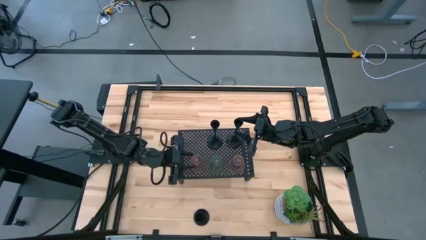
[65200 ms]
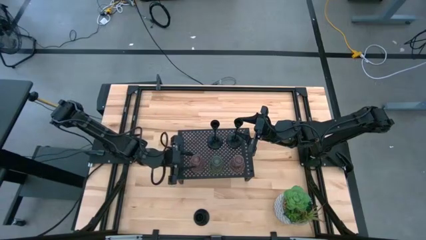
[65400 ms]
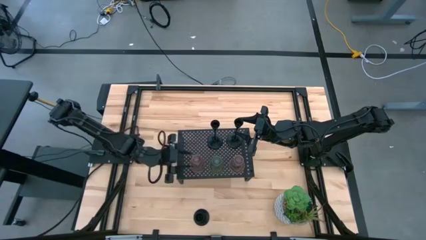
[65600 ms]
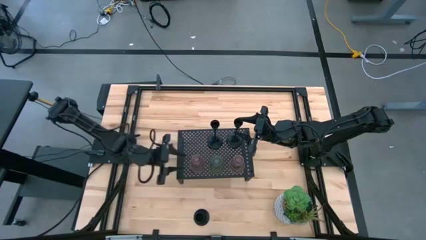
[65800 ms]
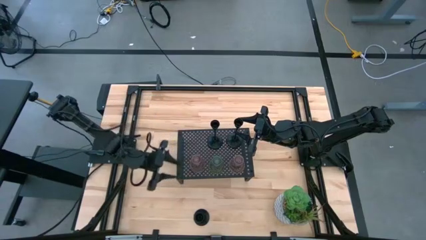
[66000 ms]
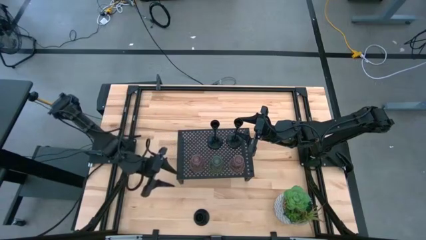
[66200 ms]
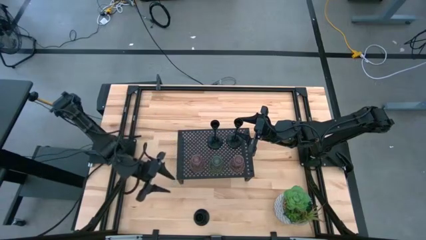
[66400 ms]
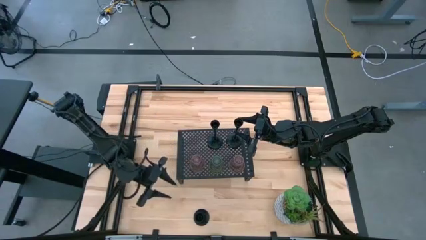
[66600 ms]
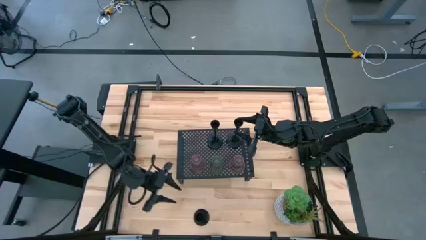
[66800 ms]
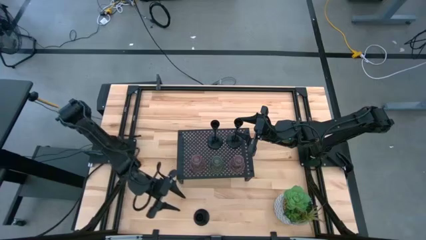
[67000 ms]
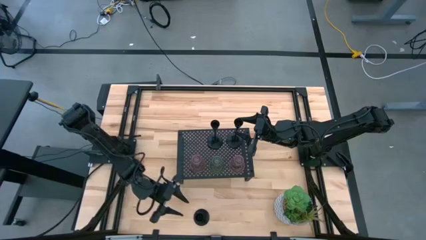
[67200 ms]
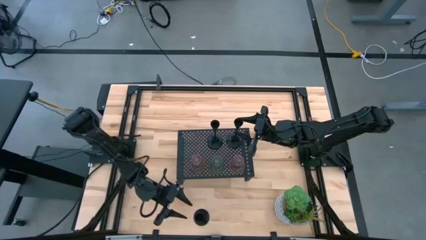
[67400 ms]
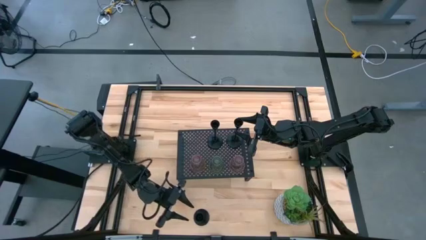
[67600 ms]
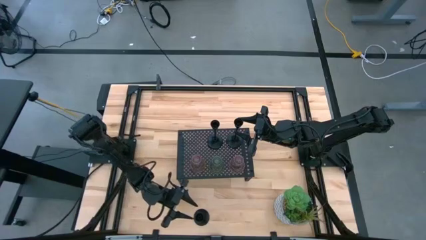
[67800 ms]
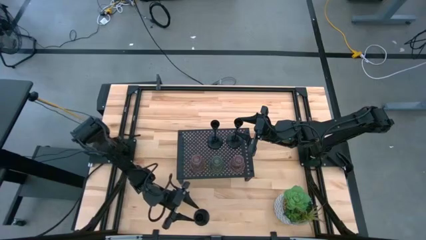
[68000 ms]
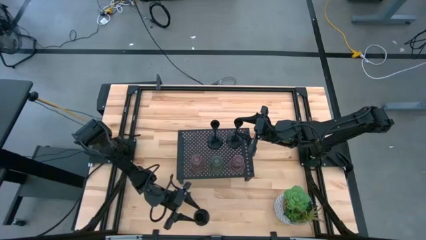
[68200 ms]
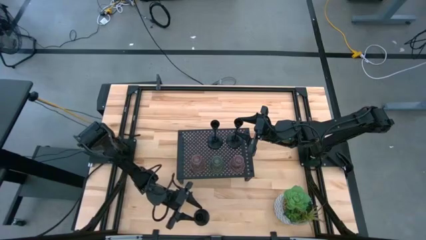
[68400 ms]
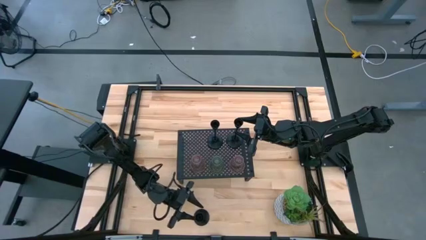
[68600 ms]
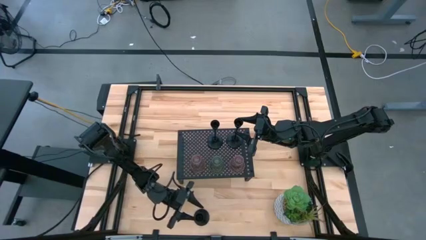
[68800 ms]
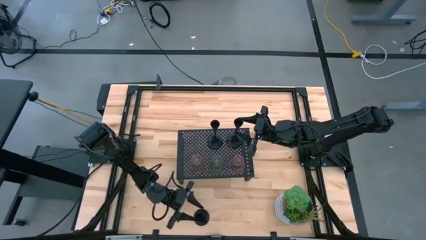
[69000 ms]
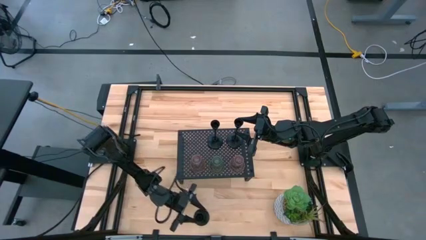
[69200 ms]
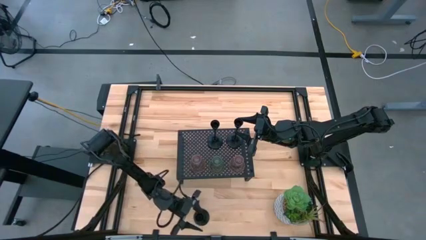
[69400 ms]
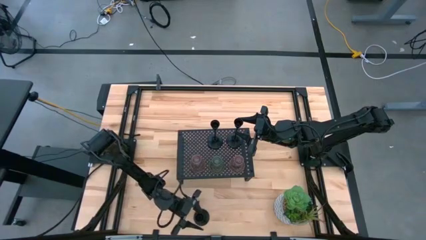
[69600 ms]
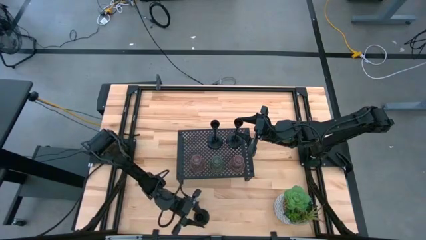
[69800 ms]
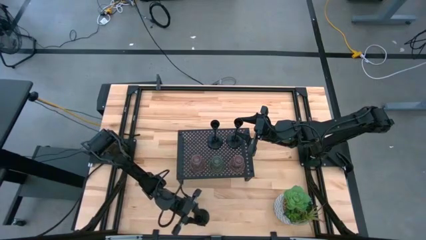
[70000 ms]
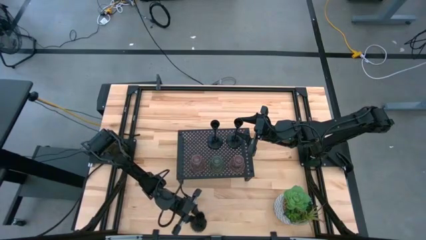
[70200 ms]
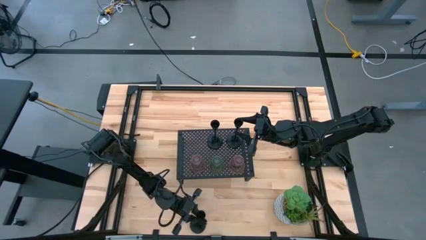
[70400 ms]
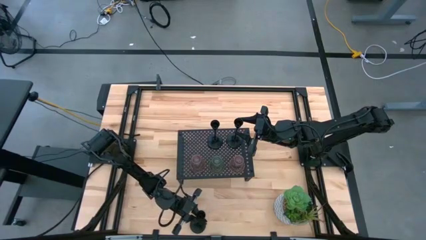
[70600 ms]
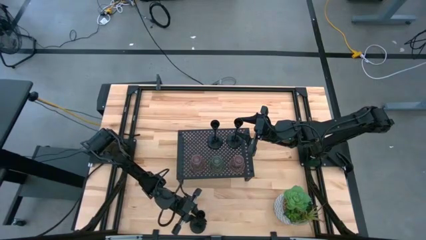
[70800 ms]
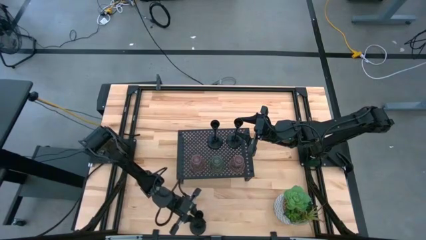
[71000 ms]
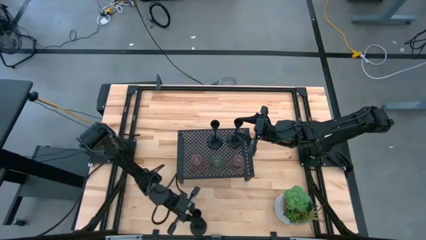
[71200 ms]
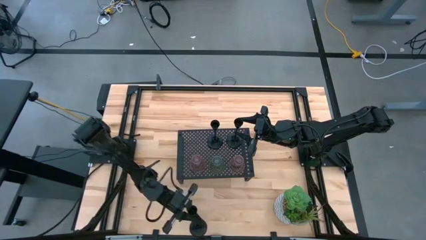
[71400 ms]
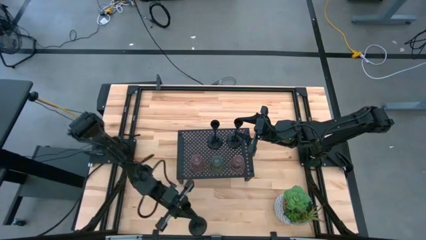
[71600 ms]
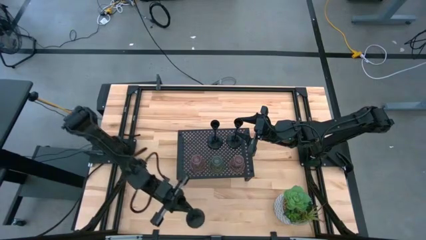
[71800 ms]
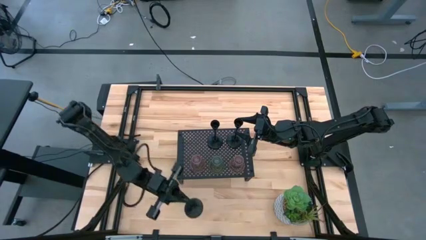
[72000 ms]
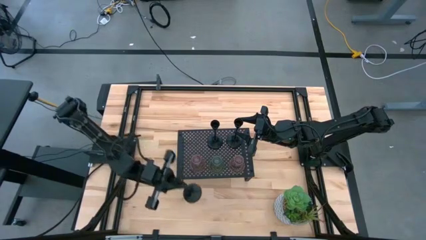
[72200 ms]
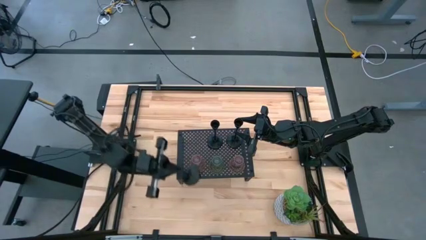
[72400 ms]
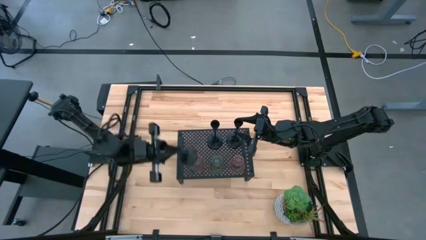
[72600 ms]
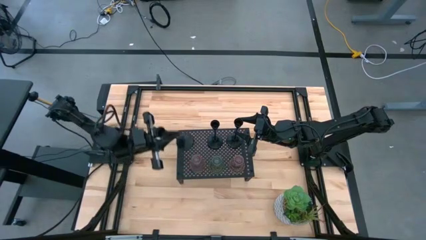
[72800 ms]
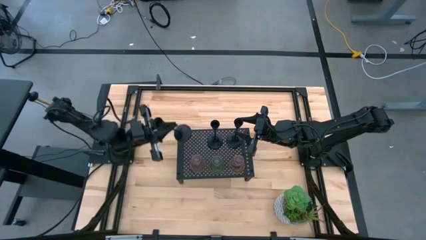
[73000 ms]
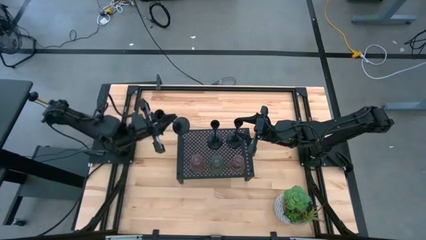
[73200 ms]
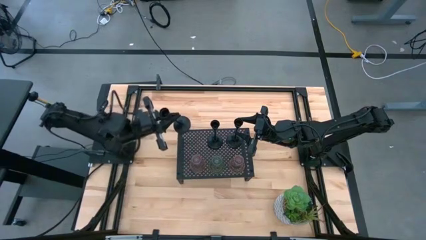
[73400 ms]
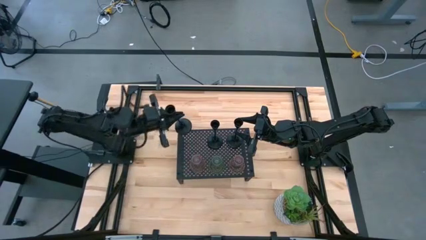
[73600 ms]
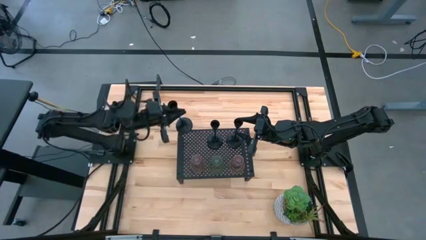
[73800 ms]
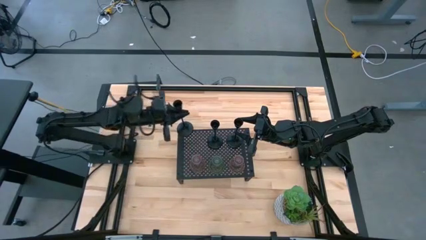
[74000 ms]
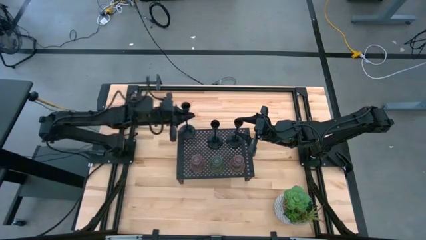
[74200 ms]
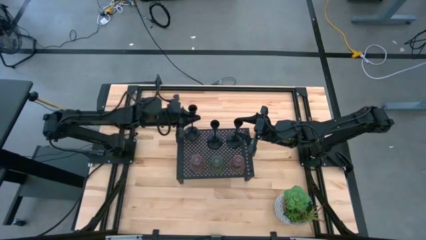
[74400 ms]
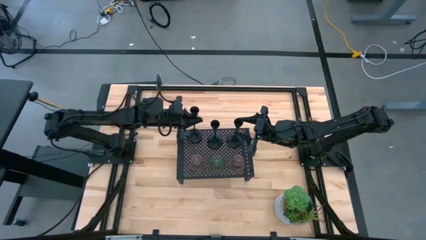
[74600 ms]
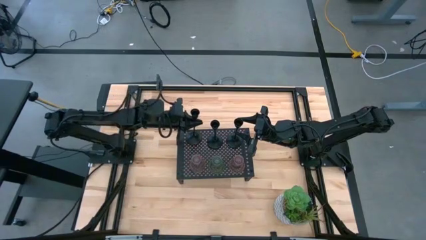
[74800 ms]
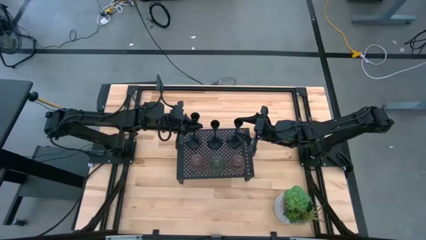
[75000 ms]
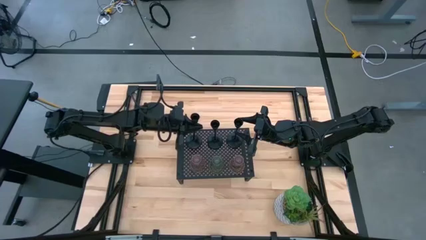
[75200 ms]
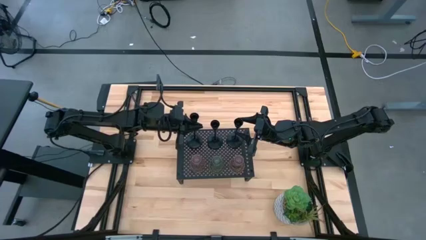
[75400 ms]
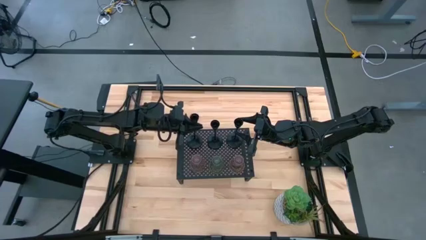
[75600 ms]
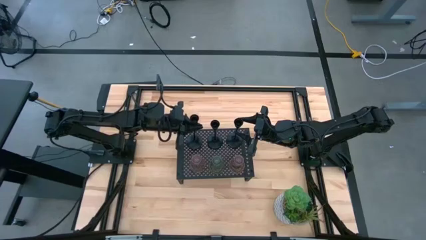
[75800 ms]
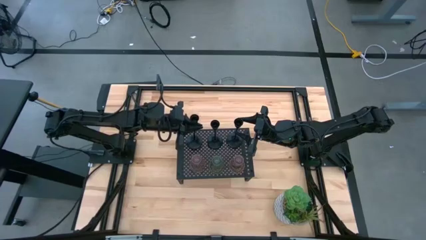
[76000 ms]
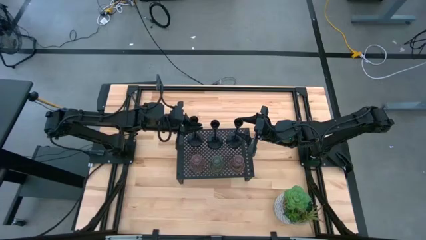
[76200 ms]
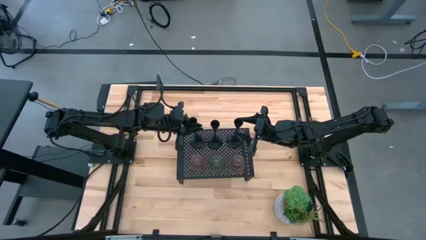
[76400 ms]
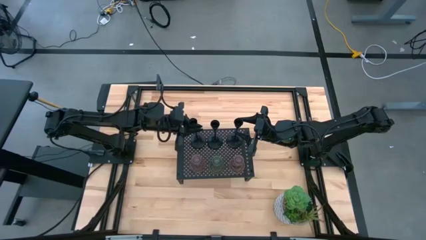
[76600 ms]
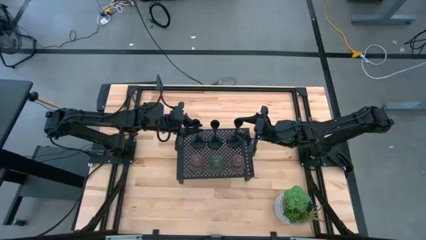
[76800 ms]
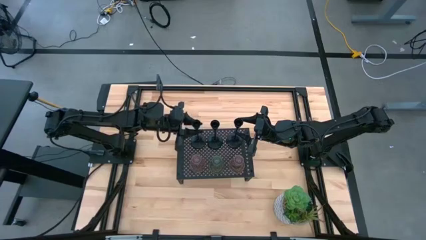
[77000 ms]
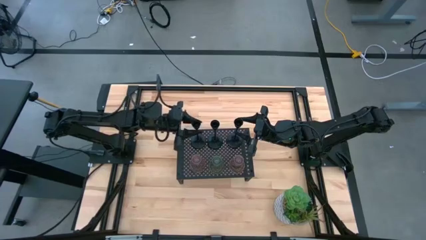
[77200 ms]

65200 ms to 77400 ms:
Task: Pick & Place candle stick holders
Align the black candle holder on the shelf with the black candle holders

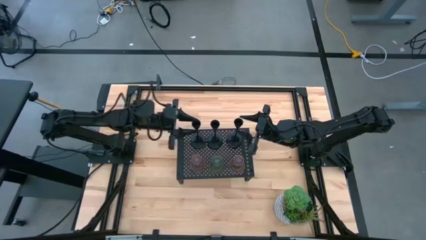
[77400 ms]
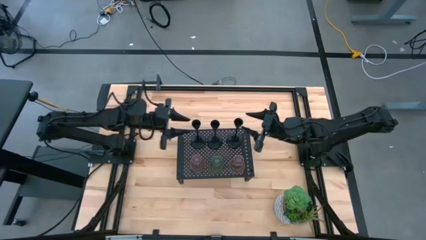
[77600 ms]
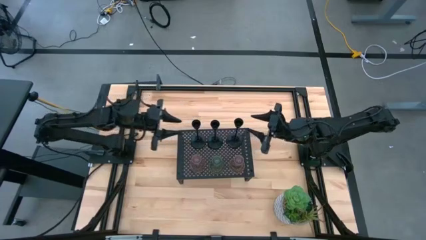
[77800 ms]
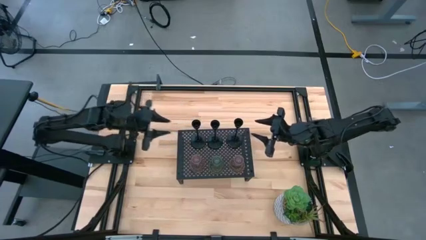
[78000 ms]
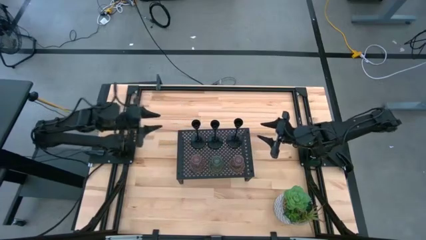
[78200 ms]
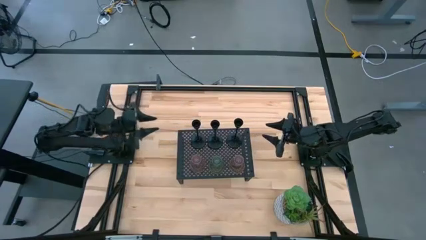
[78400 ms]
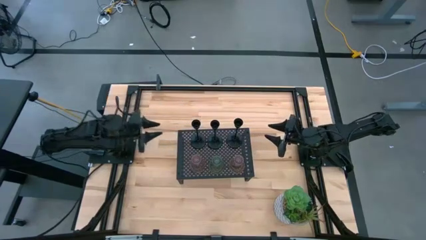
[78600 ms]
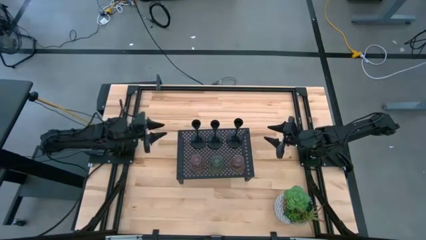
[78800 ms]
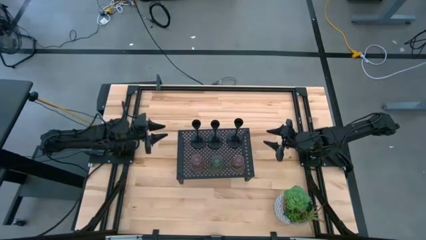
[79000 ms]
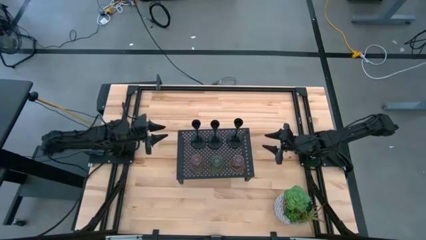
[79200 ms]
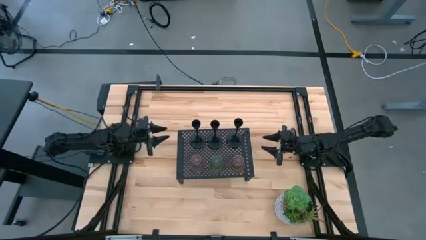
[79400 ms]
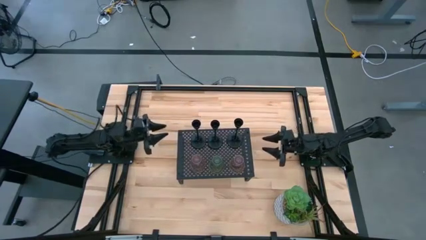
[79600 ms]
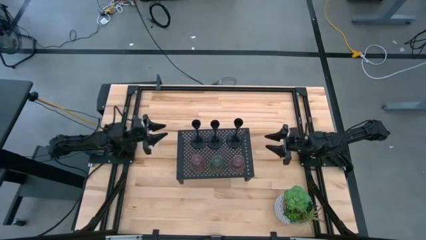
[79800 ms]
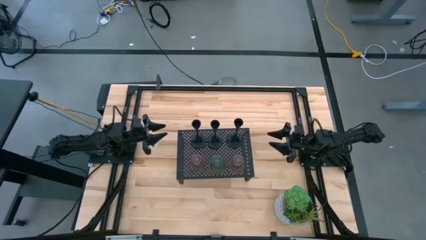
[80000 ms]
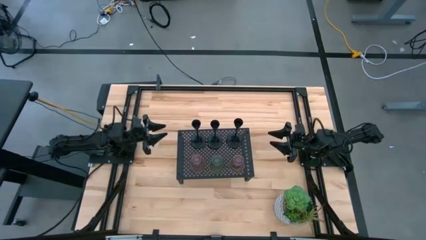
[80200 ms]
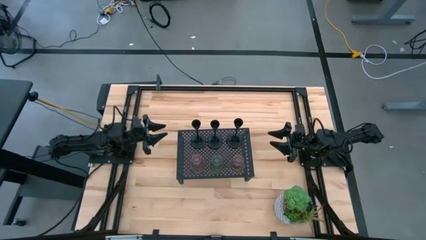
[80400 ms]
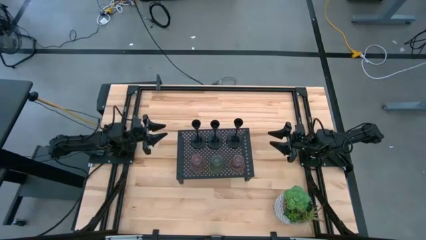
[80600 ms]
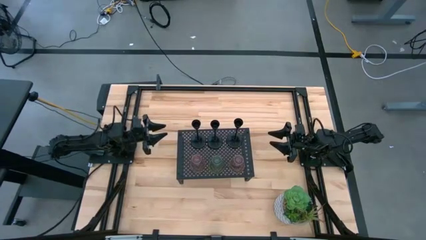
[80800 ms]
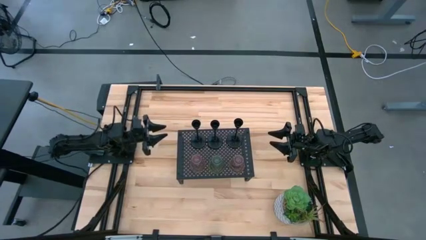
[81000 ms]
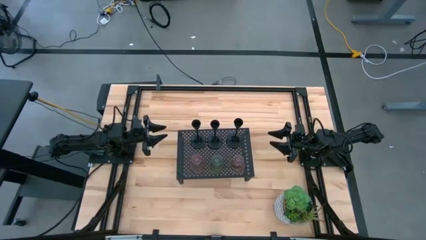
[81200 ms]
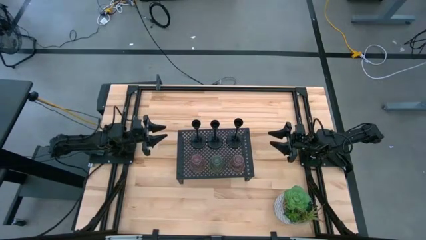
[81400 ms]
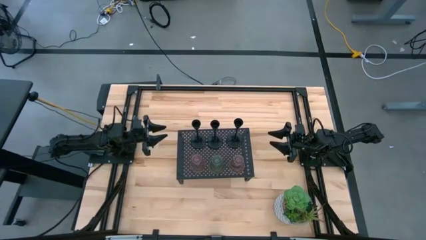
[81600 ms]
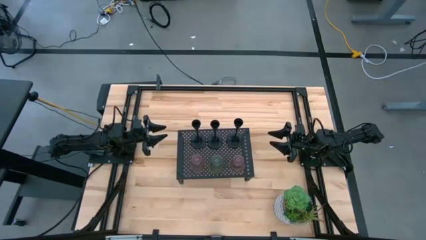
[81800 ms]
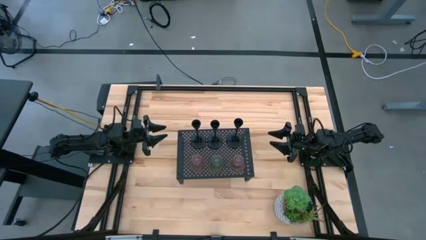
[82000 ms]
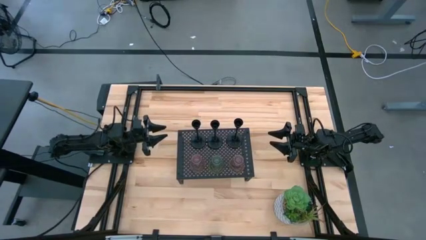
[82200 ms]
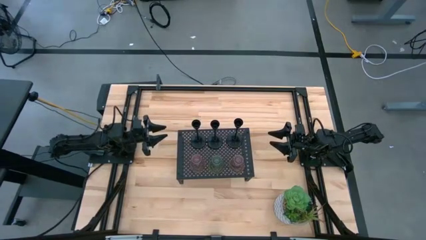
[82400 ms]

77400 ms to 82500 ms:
Return to Home Position
